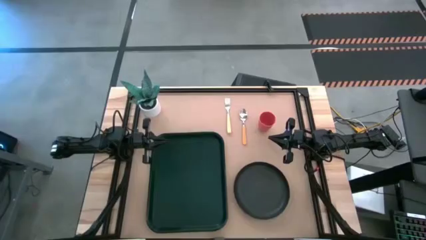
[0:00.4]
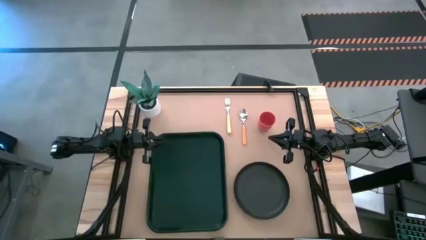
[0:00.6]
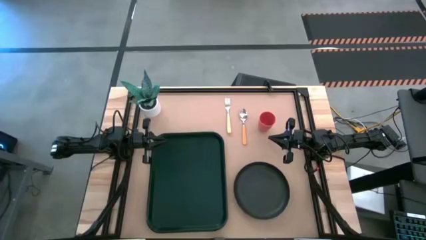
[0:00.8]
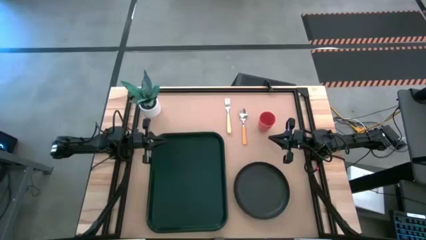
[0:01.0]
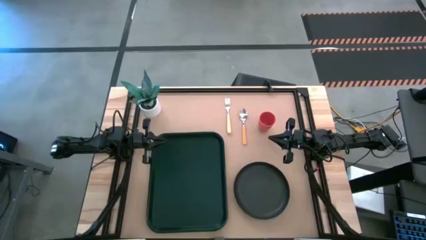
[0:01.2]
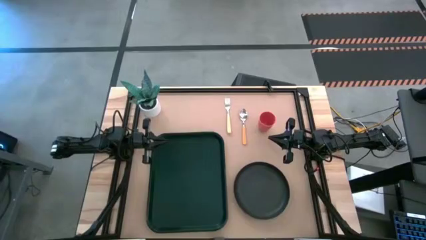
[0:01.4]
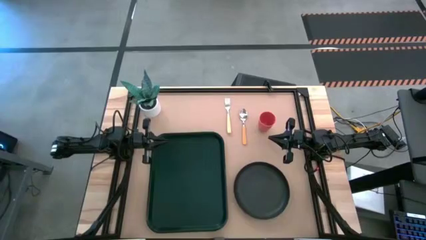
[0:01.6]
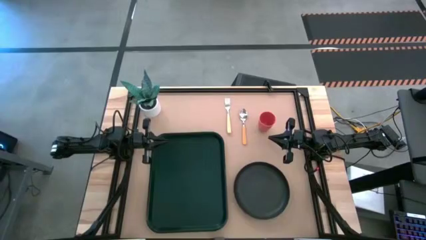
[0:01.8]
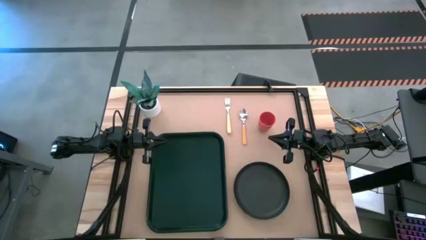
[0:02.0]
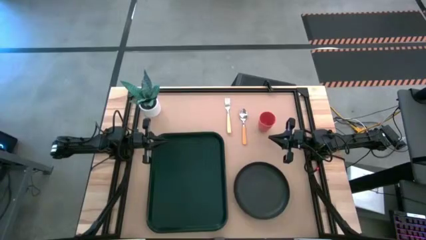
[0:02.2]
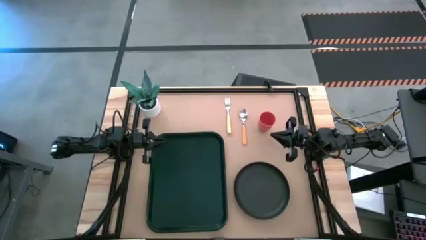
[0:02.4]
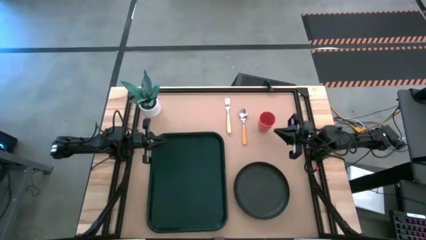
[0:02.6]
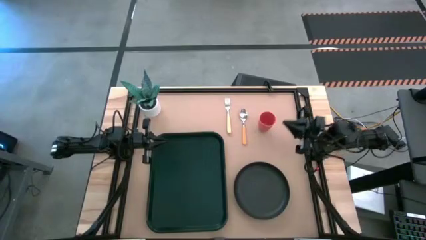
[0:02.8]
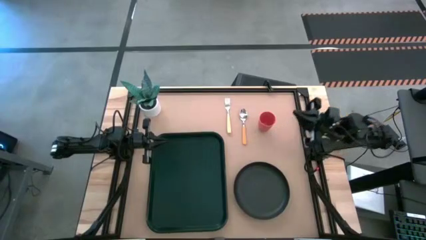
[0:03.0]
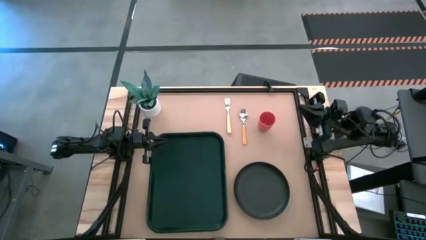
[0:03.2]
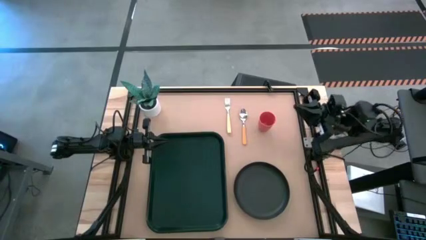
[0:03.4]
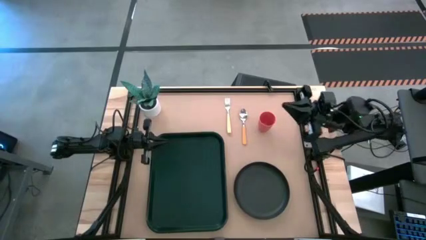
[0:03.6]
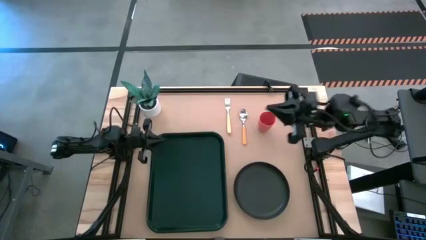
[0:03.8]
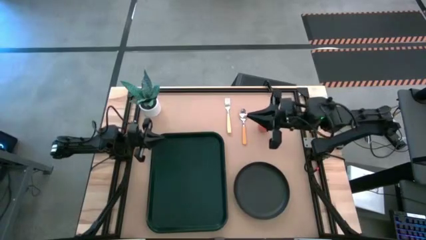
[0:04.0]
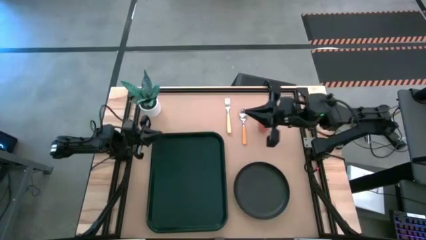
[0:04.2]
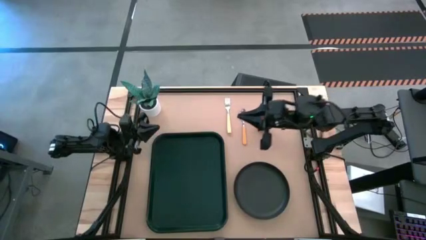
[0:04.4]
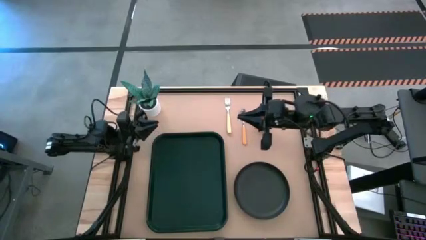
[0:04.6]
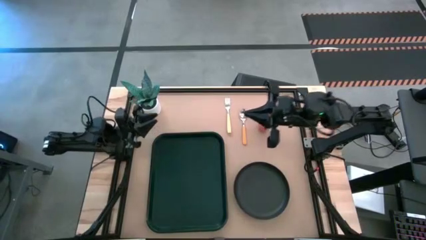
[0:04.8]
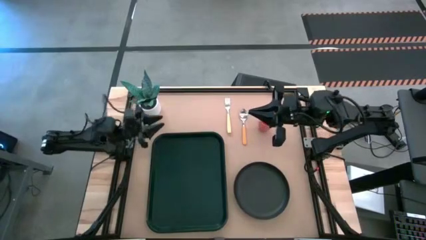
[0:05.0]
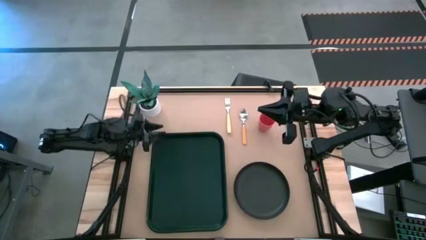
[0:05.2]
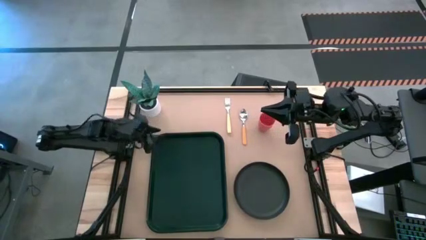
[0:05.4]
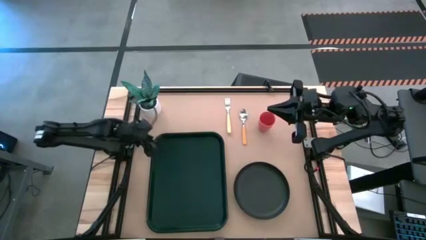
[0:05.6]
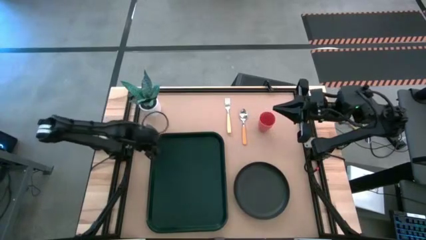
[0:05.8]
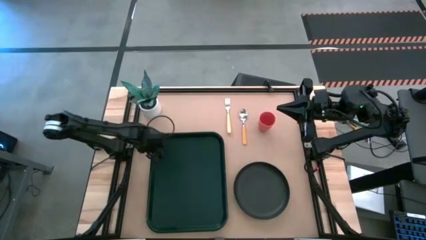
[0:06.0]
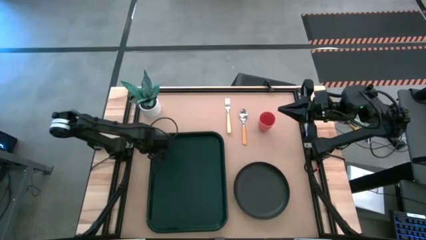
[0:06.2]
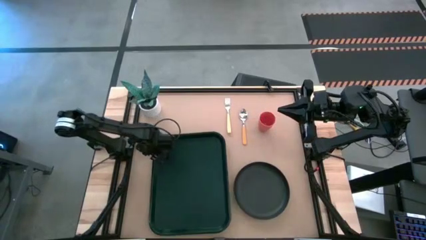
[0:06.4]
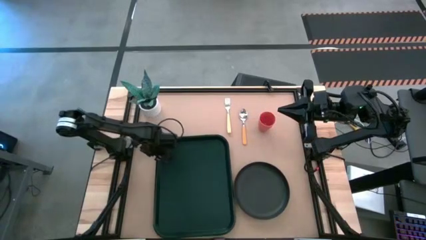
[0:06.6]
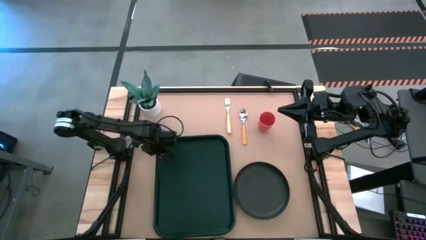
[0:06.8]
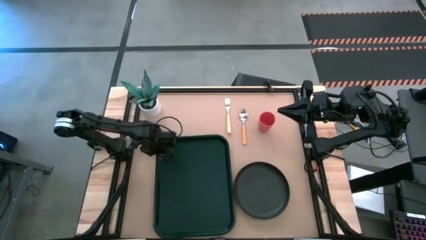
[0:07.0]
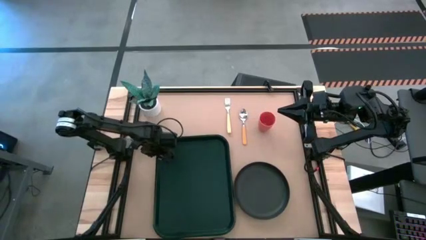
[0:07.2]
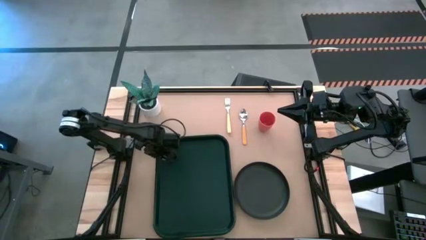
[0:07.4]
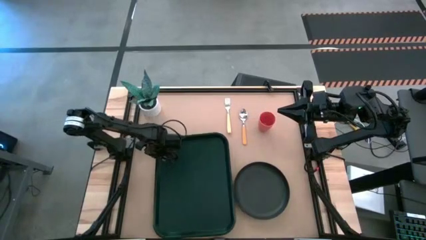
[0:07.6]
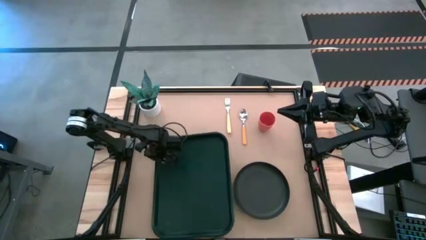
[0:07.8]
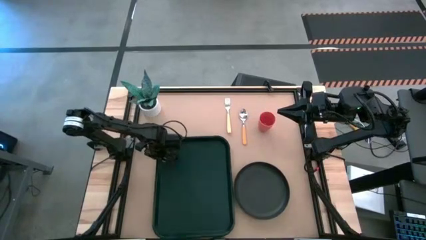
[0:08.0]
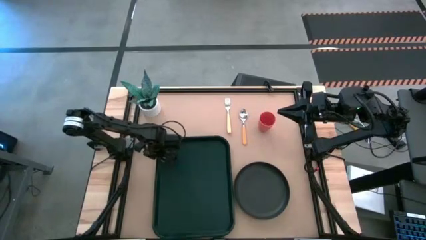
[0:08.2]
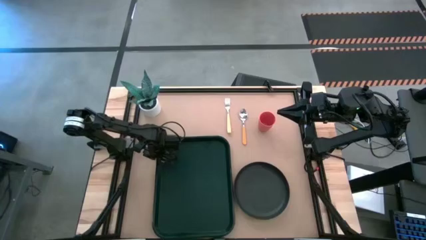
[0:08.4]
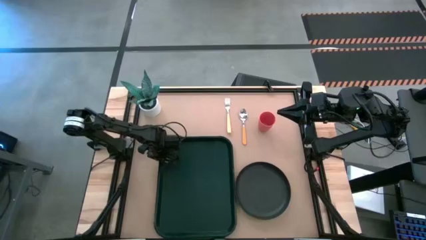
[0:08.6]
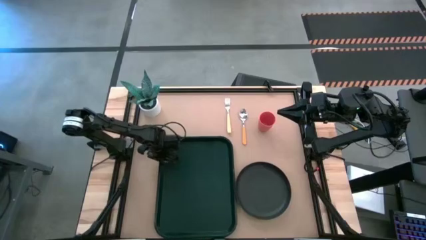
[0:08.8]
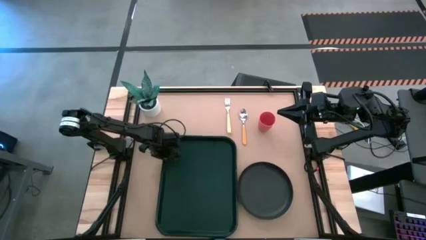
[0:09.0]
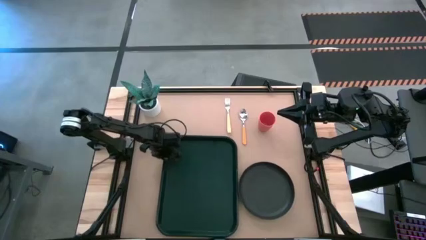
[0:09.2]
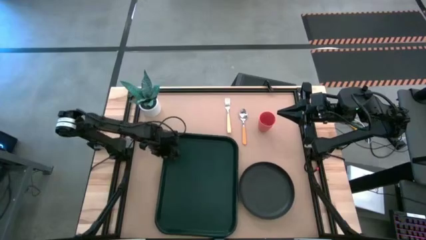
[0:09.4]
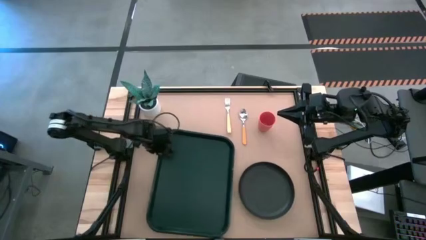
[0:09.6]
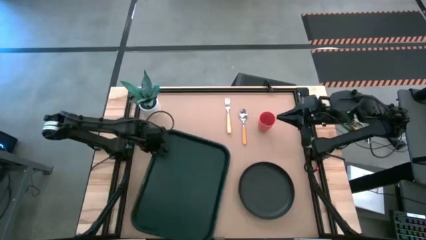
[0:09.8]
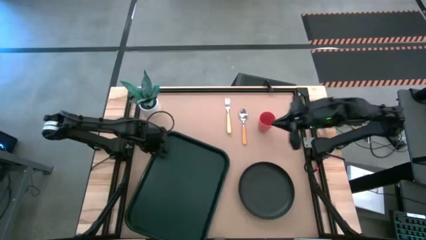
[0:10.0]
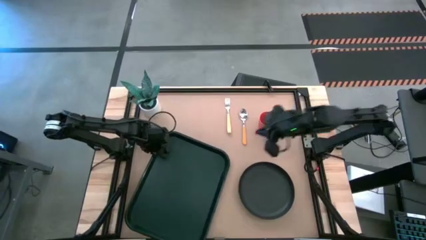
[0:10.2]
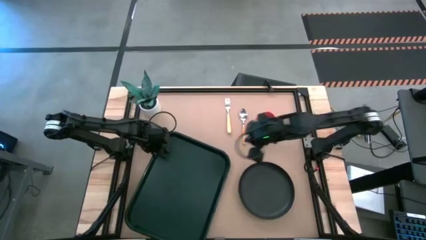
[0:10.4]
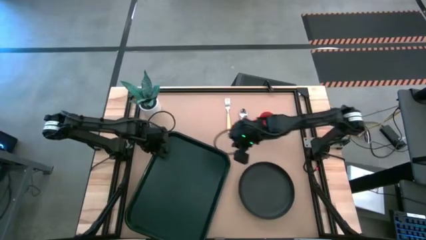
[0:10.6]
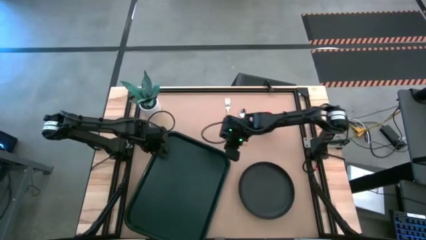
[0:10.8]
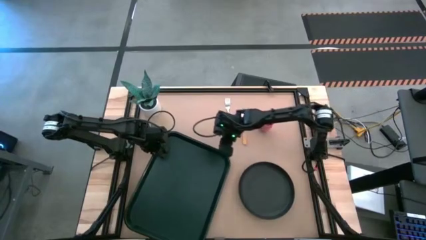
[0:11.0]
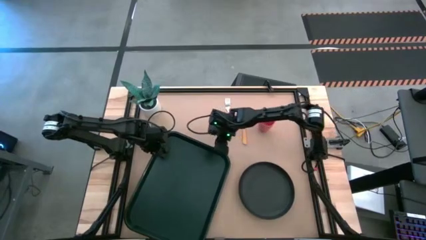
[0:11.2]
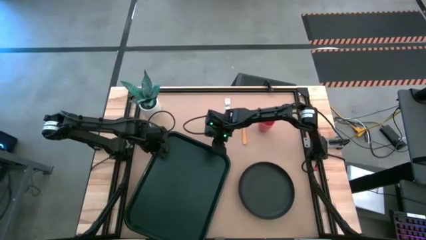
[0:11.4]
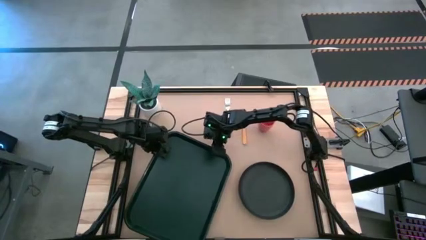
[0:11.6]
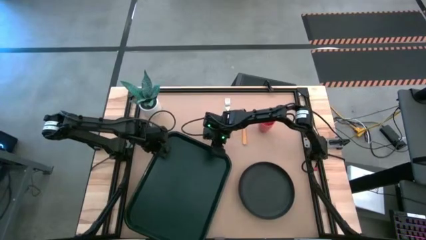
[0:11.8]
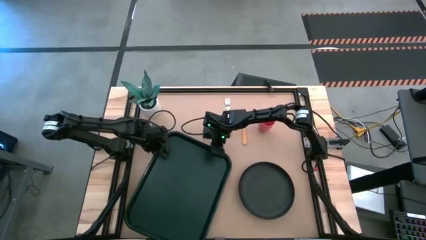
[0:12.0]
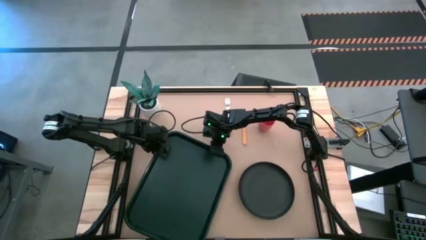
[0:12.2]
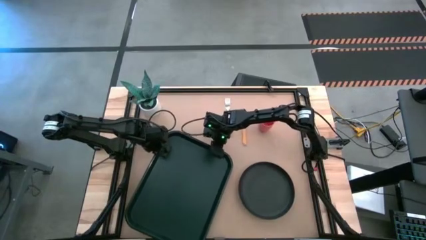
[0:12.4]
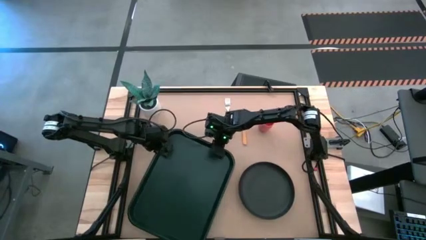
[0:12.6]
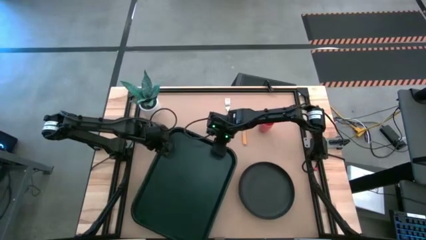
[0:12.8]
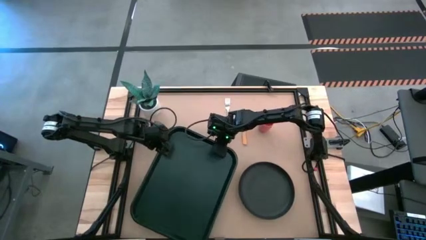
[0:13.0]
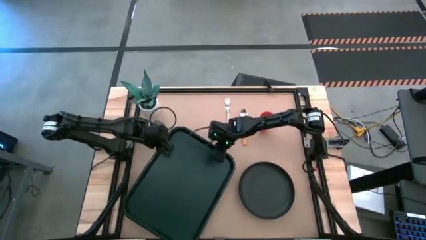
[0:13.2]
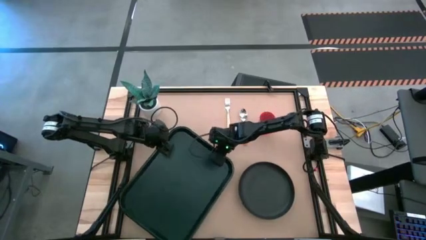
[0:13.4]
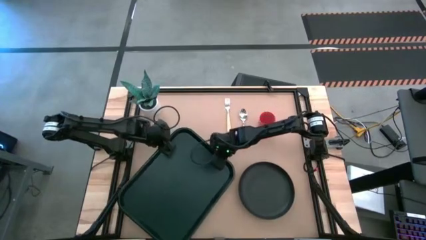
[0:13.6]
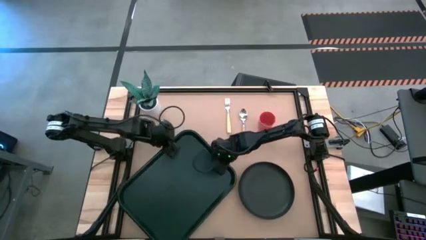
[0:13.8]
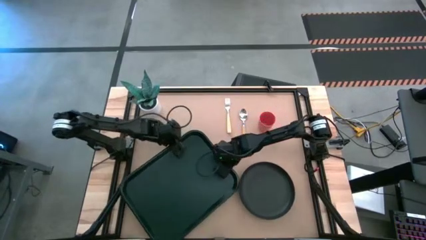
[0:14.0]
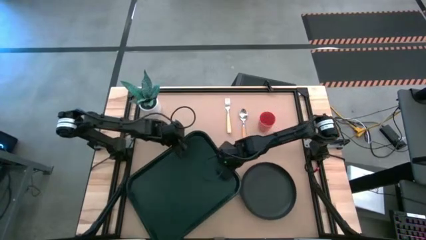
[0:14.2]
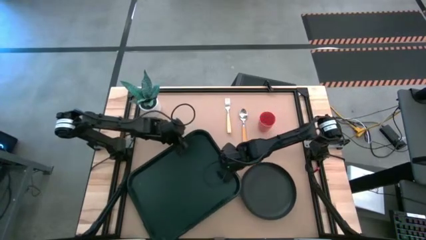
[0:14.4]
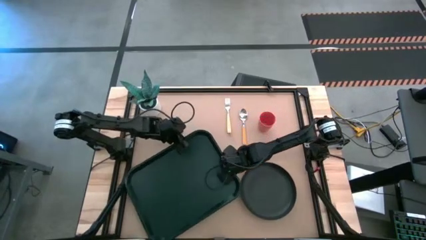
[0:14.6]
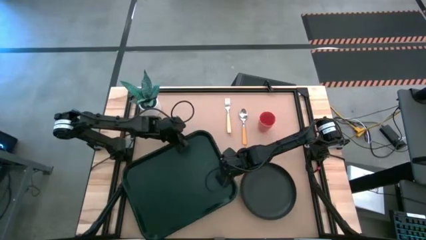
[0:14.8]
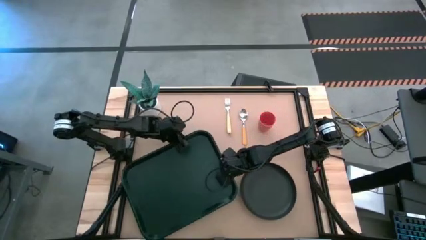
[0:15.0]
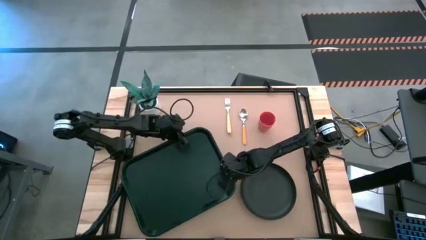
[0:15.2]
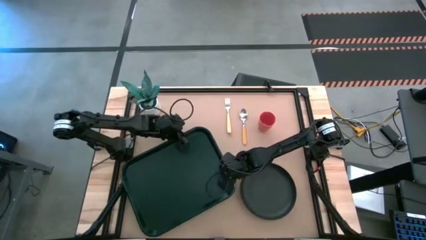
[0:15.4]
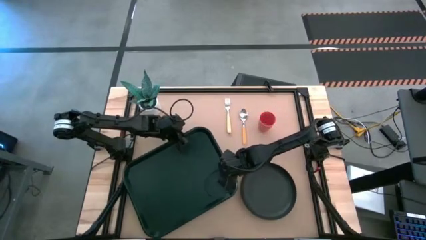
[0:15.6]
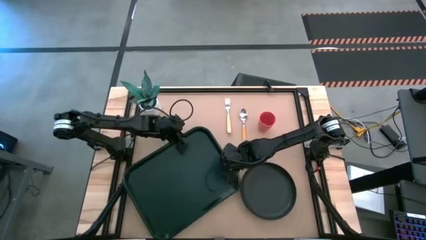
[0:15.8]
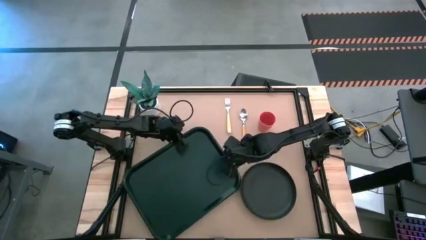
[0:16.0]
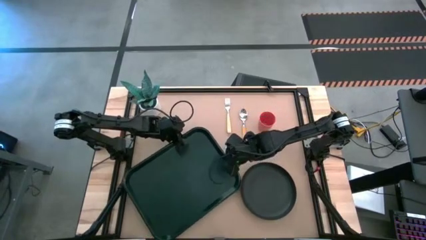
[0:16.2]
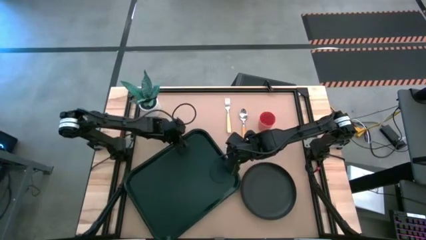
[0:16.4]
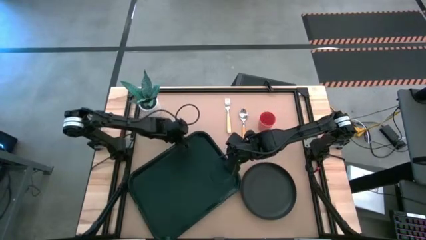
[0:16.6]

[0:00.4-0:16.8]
Task: Pick and place plate/cup/fork/spoon on tray
Adjust the black serving tray
